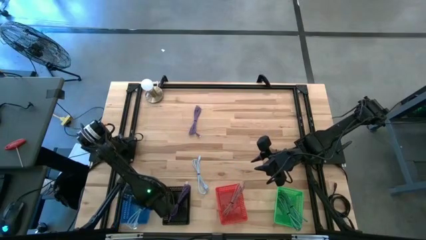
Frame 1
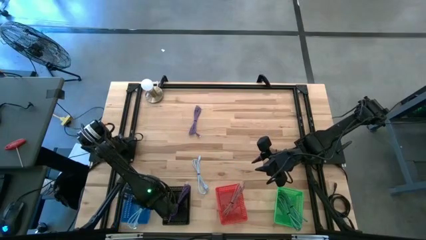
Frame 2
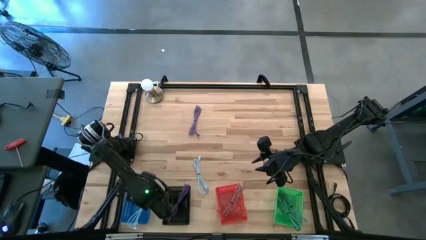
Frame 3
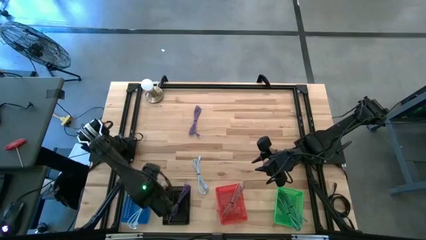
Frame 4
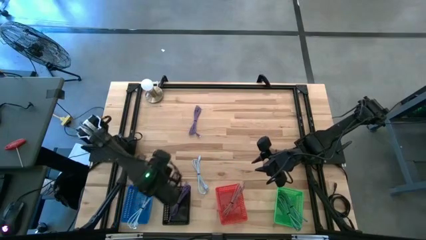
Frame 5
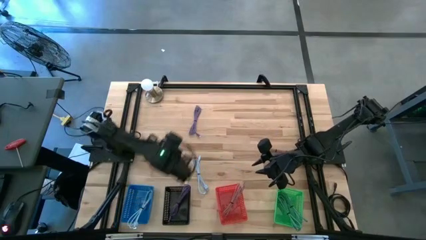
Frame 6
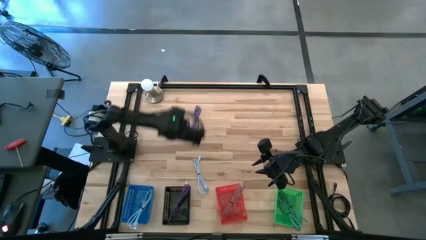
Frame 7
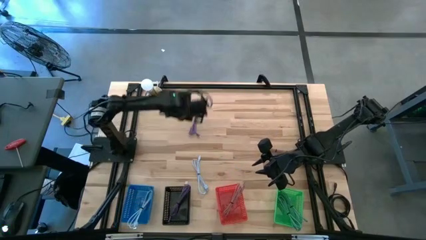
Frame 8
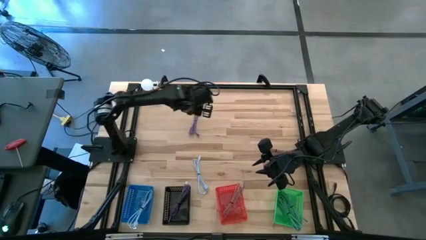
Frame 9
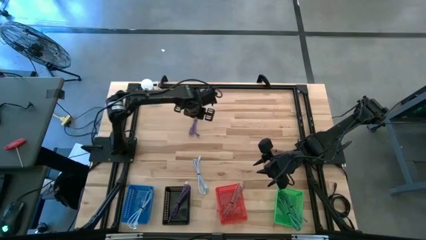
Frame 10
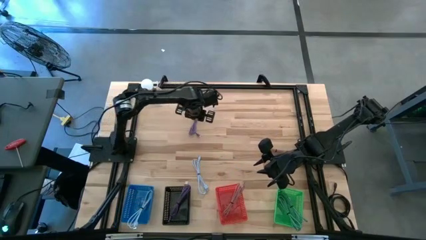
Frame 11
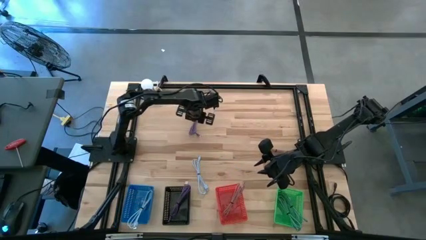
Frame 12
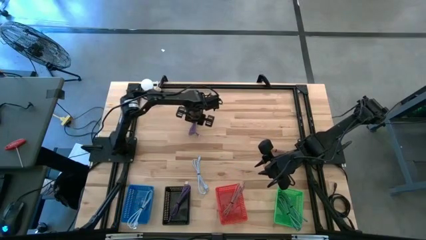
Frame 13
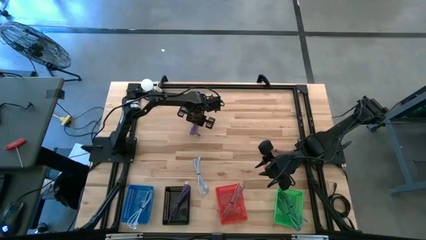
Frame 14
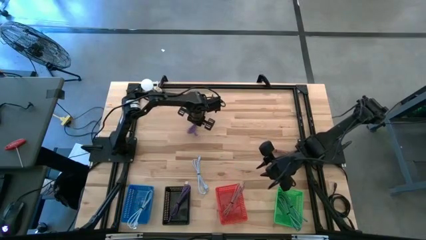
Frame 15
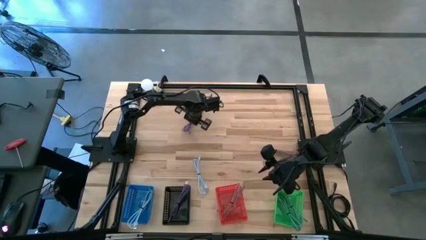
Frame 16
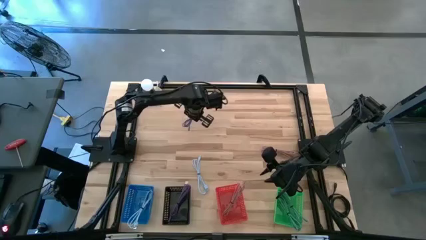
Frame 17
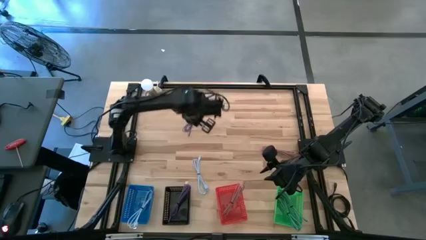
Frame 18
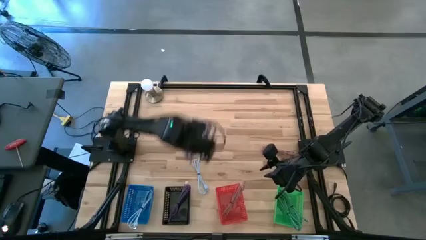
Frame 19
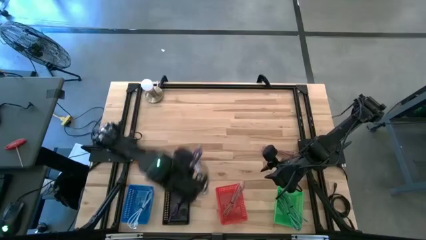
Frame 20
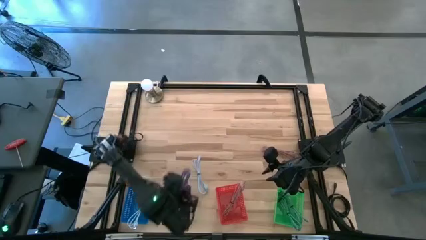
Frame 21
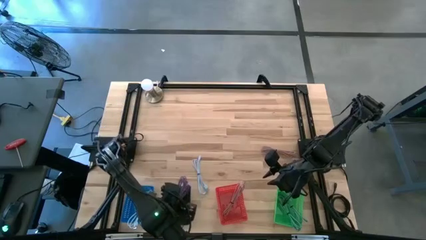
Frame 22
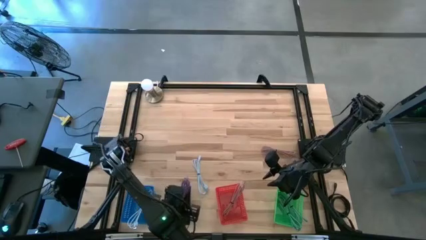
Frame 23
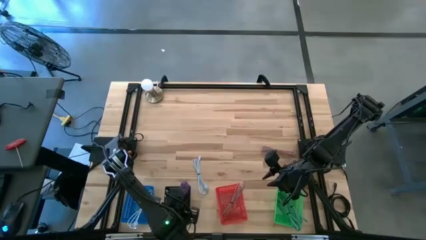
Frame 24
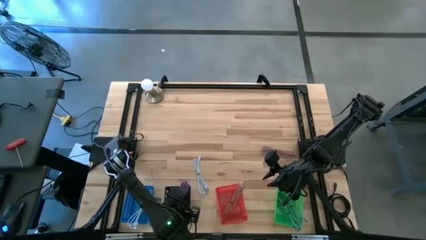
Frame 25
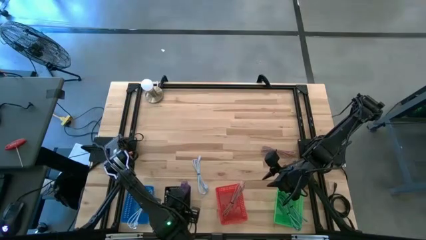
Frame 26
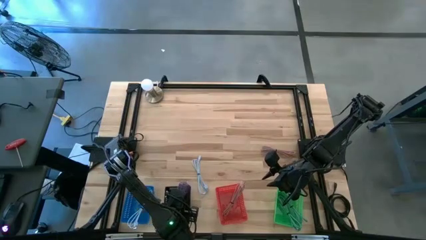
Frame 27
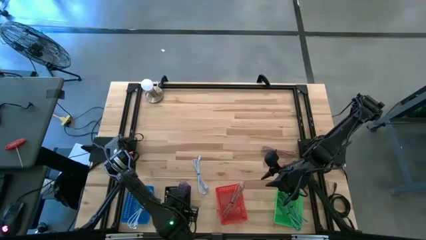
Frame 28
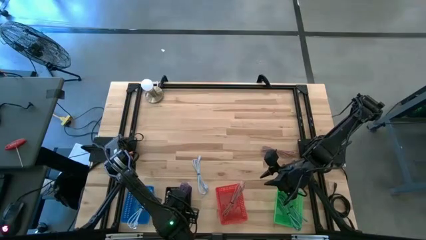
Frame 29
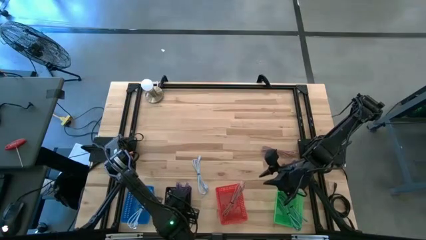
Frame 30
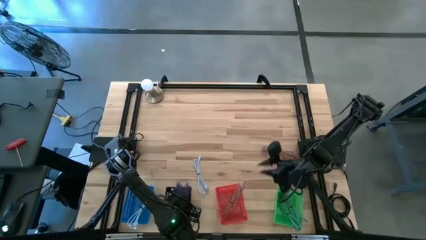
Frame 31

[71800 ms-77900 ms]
Task: Pick & Place USB Port
Put the purple charger cable into the black bin

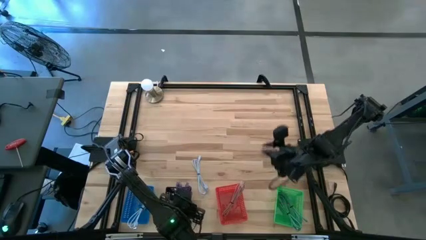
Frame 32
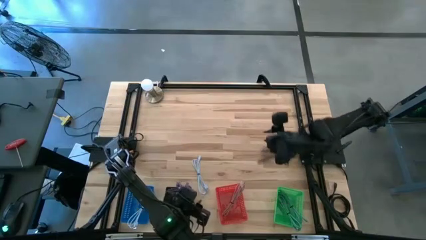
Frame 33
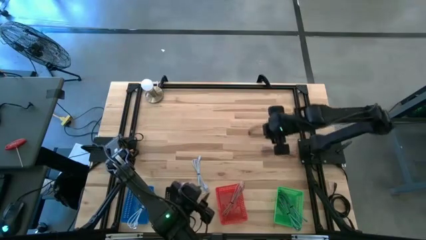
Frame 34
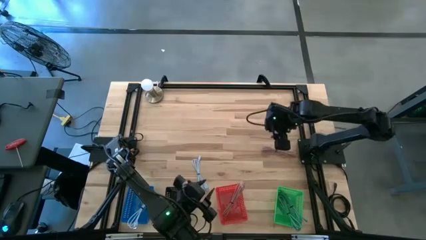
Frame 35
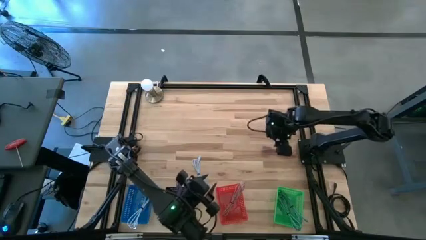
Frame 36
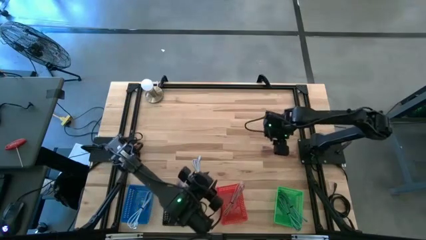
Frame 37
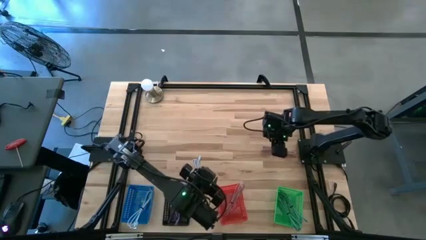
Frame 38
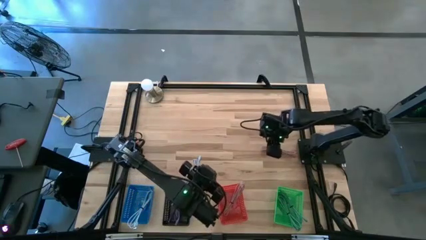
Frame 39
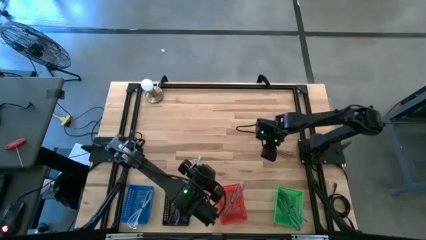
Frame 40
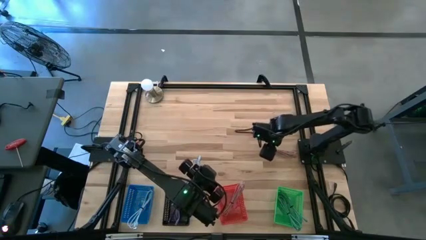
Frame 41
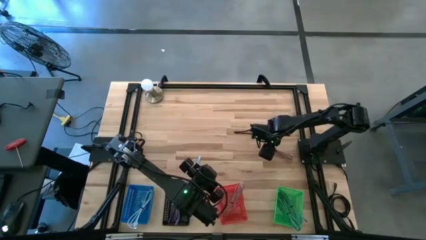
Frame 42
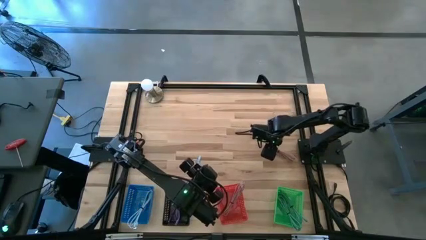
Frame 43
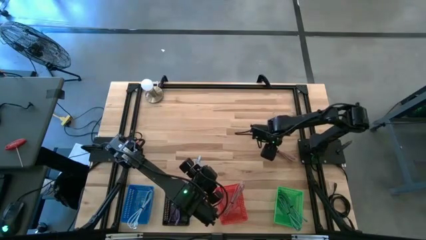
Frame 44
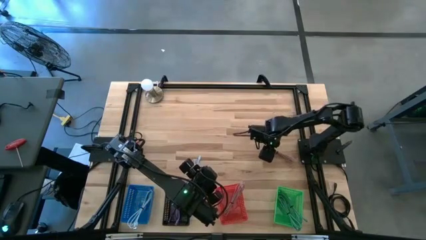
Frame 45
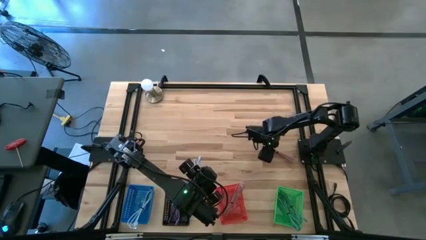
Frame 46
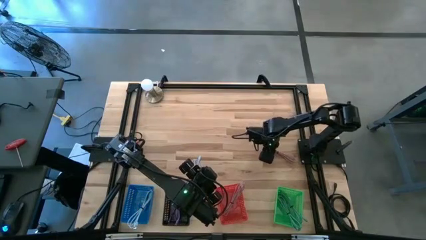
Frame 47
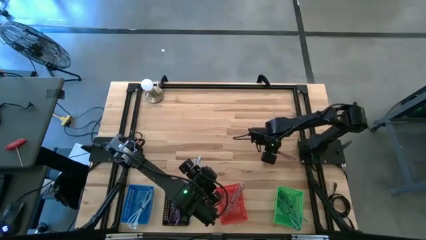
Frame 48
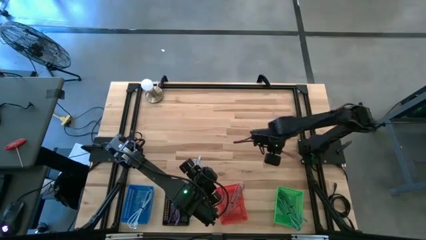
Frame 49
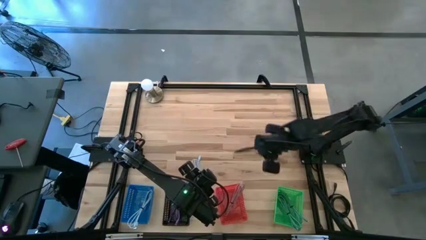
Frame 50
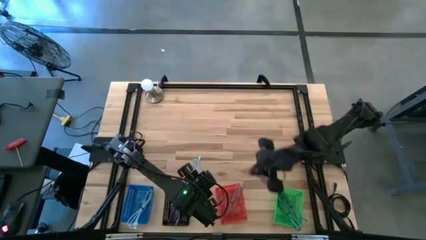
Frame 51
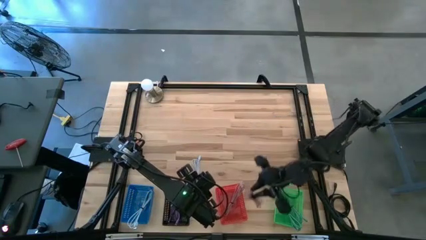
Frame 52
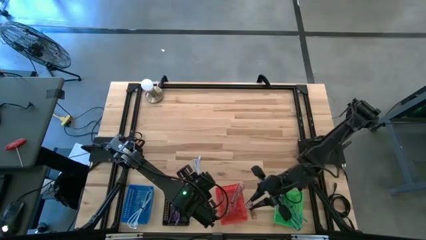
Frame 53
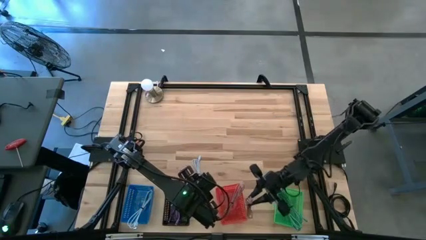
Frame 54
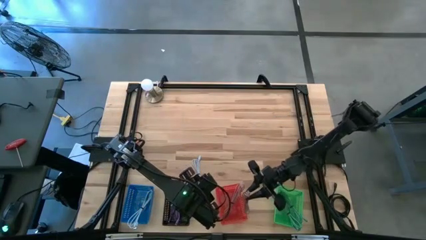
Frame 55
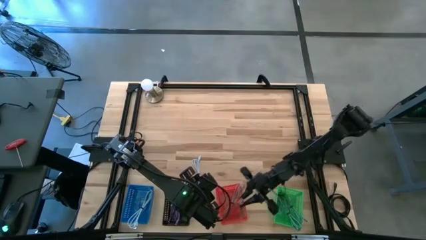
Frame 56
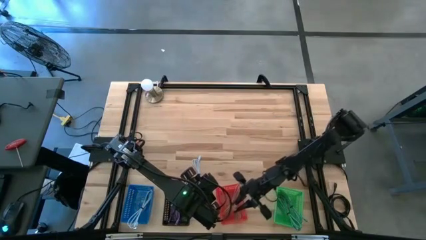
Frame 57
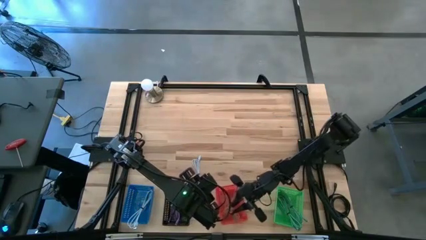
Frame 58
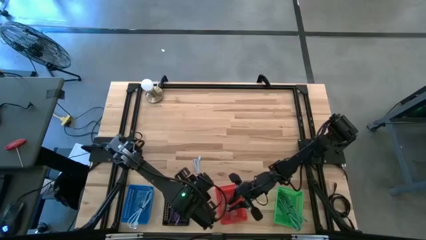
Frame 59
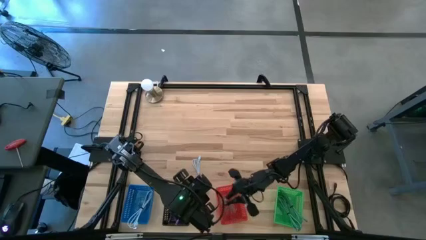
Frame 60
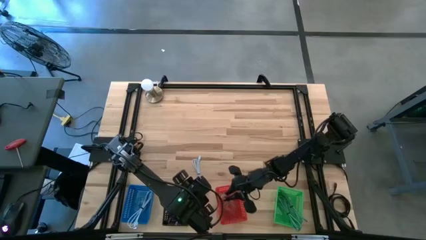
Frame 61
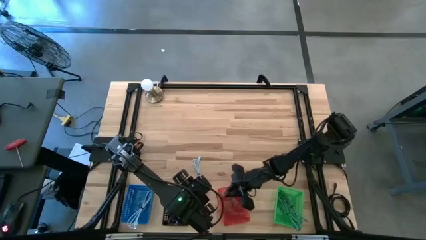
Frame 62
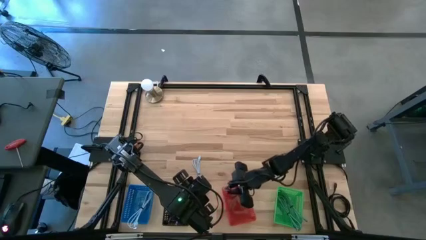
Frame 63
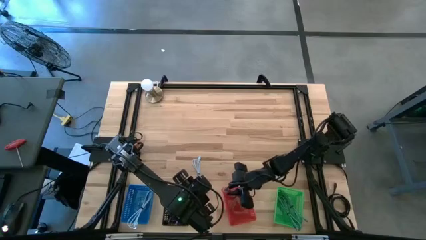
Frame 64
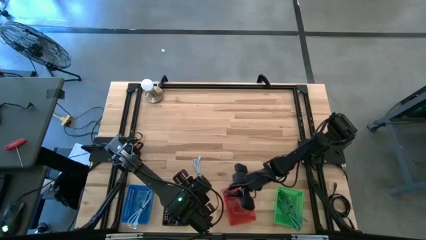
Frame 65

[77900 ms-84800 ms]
Put the pink charger cable into the red bin

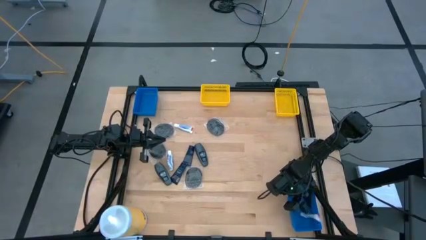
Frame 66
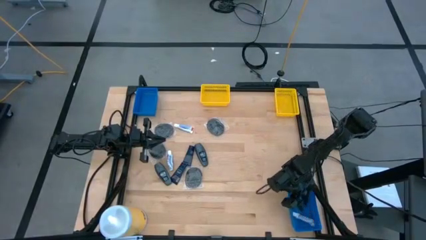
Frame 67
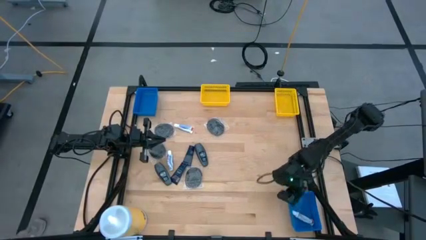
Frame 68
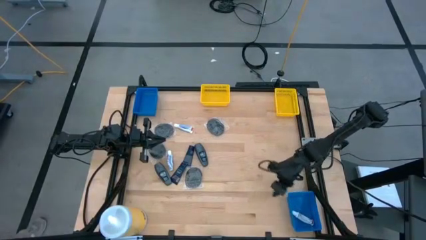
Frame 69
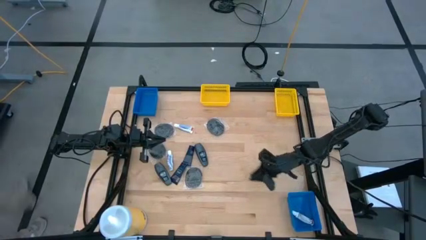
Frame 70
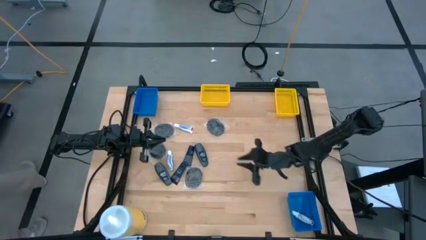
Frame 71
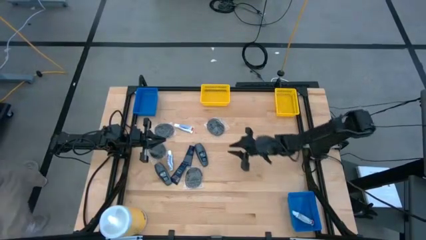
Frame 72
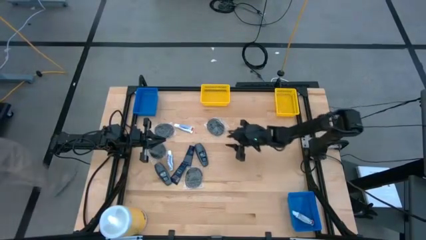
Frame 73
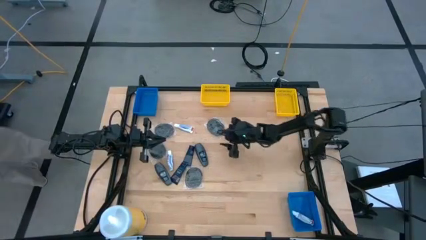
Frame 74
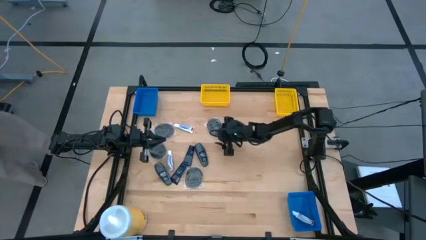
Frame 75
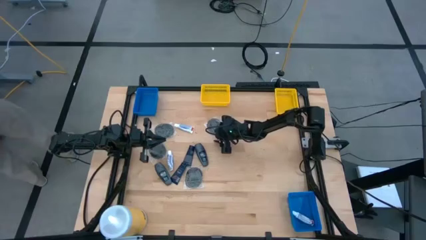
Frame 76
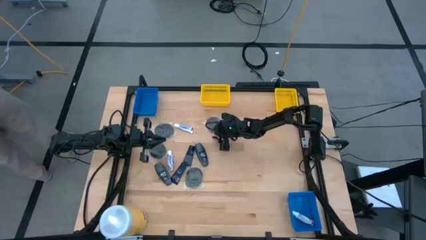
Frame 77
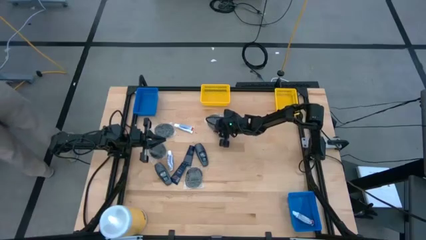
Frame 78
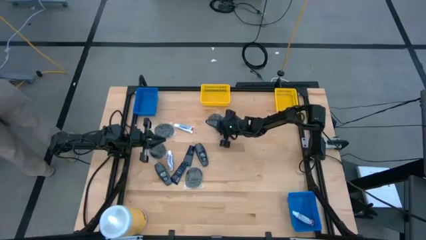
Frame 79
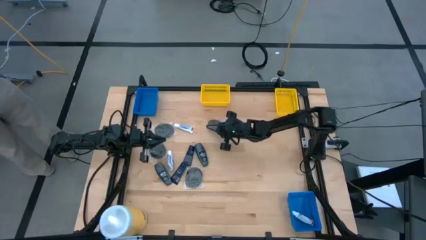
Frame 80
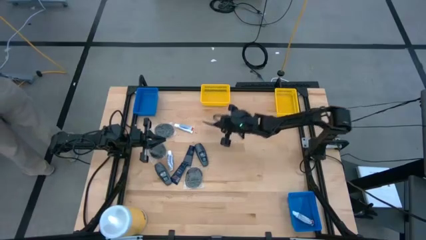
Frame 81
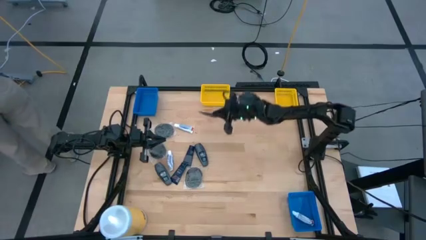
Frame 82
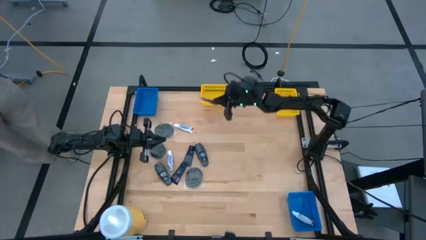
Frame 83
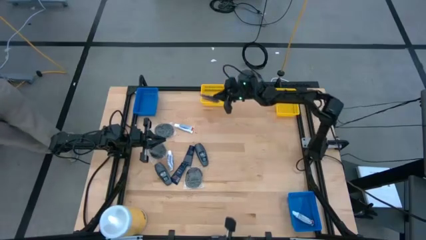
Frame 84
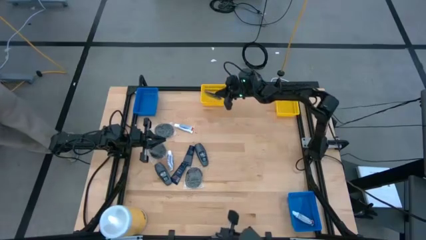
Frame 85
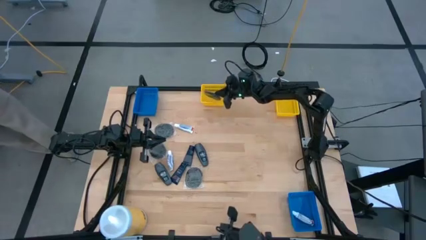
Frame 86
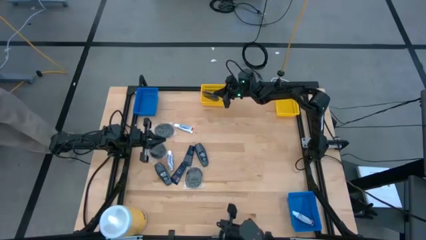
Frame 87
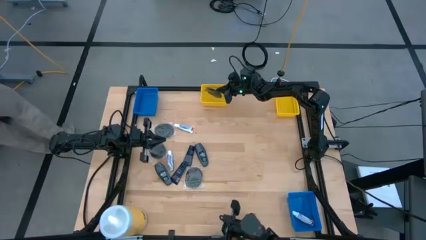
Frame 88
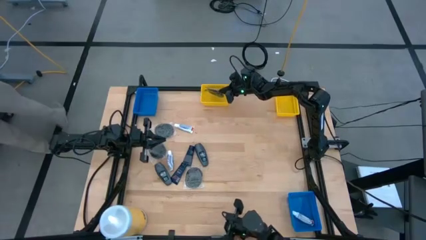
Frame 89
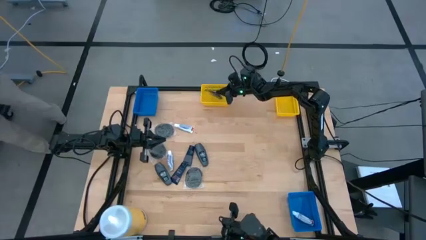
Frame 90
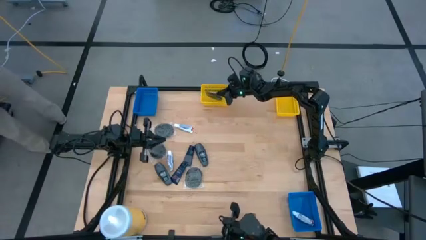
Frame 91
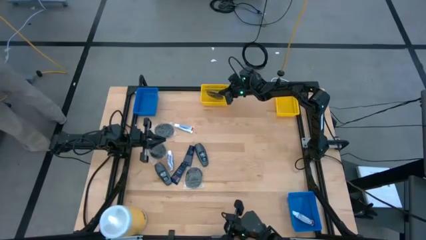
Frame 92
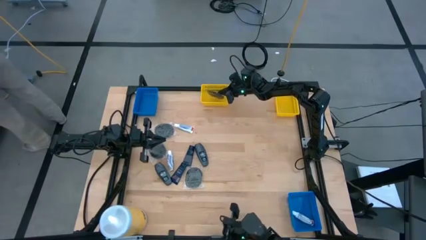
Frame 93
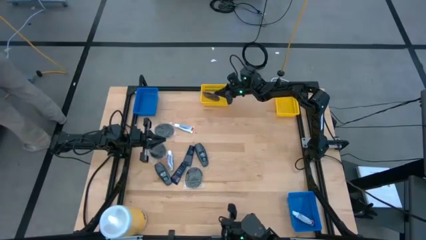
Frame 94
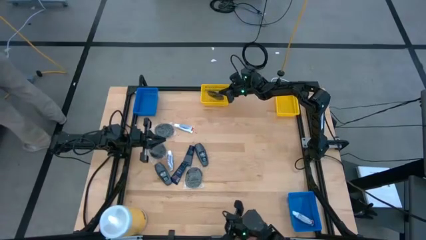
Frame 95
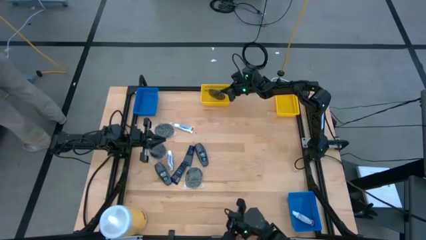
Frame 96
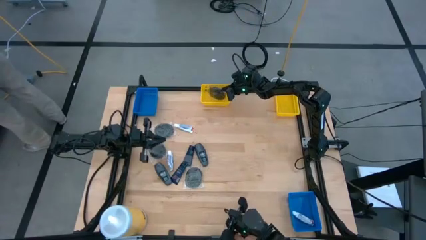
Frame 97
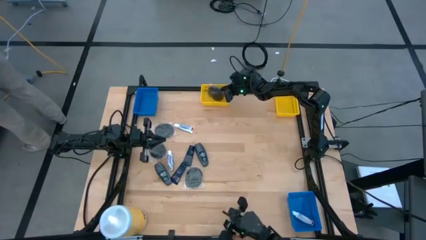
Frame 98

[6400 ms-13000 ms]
Task: Pick & Place Travel size toiletries
Put the hairbrush into the left yellow bin
